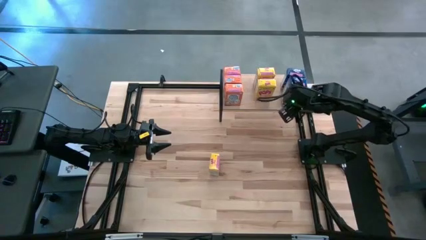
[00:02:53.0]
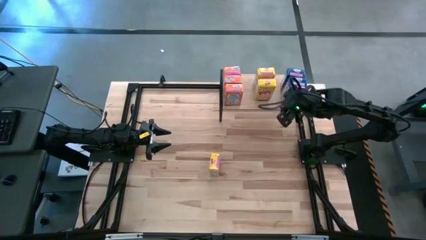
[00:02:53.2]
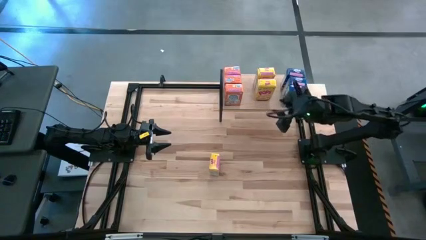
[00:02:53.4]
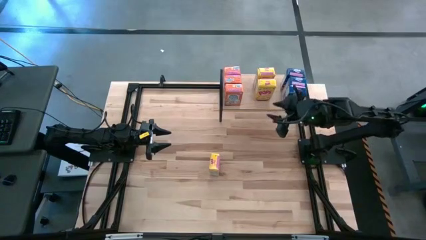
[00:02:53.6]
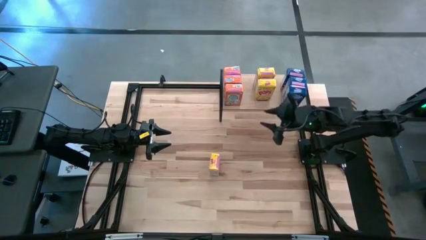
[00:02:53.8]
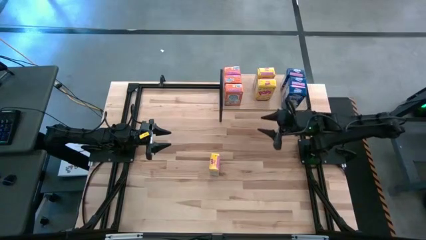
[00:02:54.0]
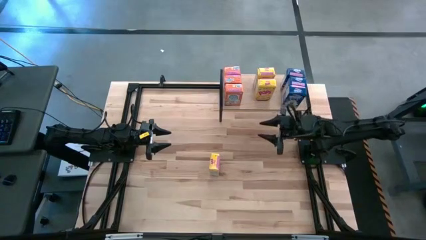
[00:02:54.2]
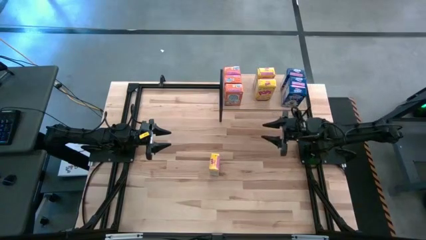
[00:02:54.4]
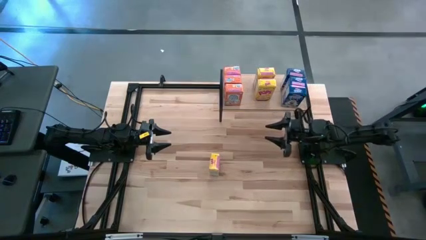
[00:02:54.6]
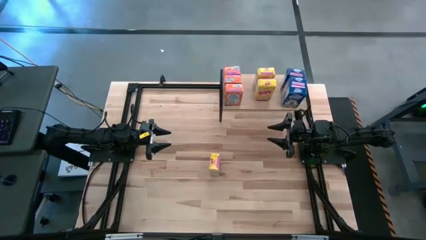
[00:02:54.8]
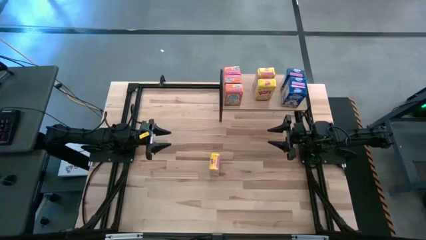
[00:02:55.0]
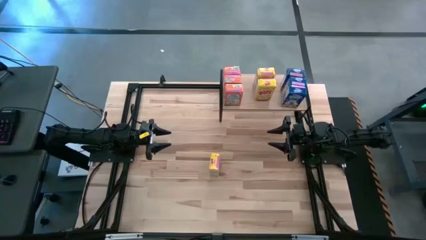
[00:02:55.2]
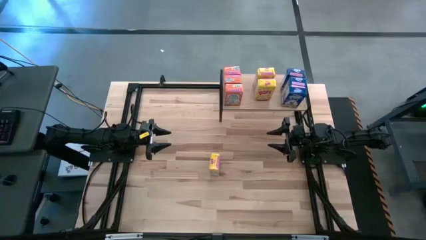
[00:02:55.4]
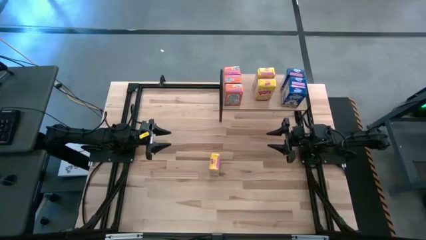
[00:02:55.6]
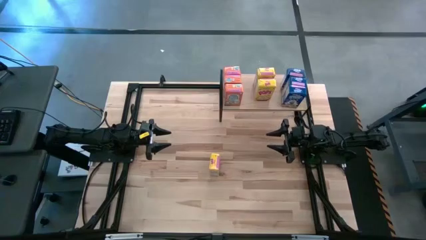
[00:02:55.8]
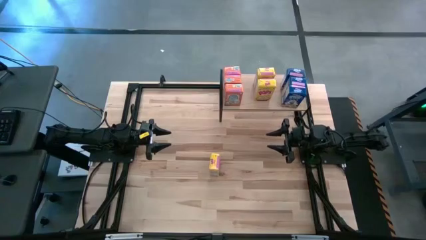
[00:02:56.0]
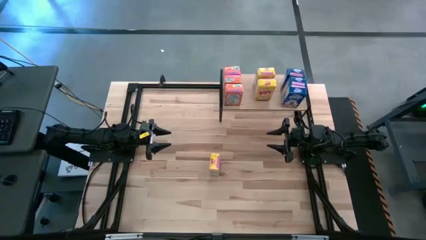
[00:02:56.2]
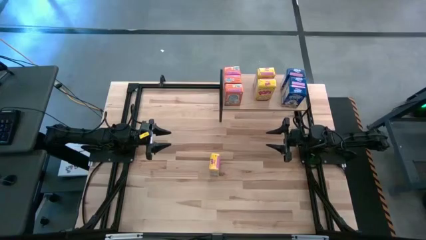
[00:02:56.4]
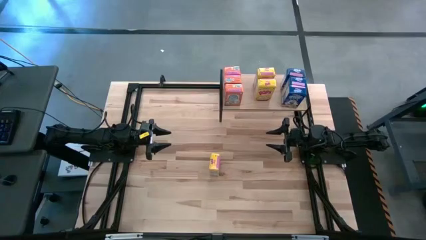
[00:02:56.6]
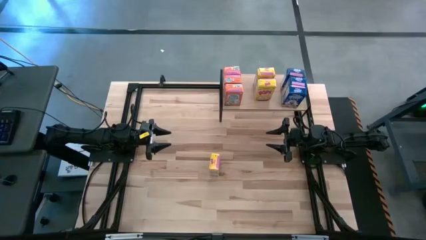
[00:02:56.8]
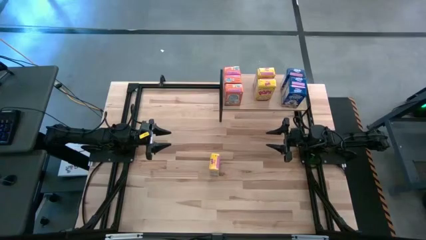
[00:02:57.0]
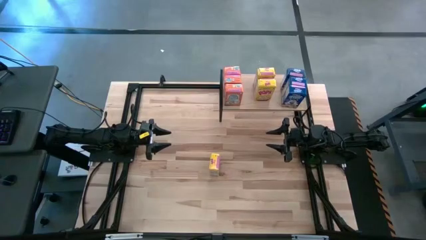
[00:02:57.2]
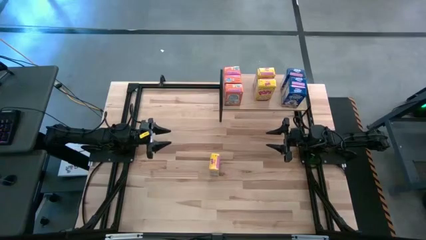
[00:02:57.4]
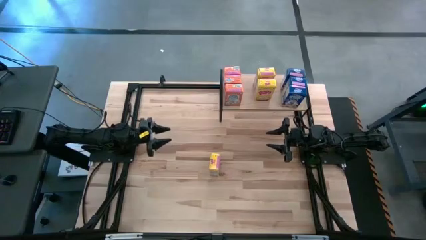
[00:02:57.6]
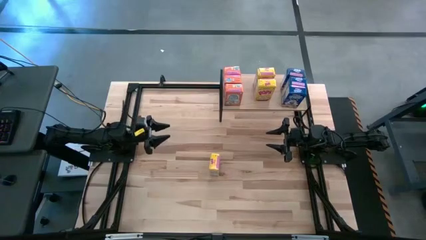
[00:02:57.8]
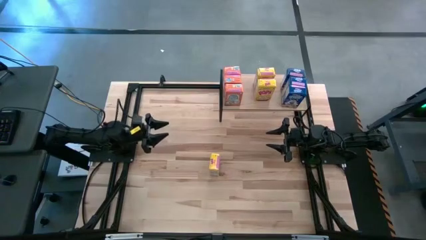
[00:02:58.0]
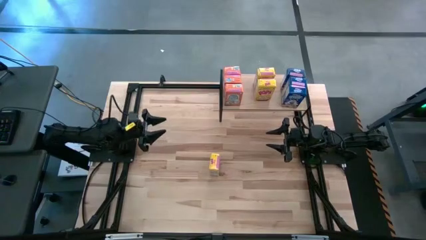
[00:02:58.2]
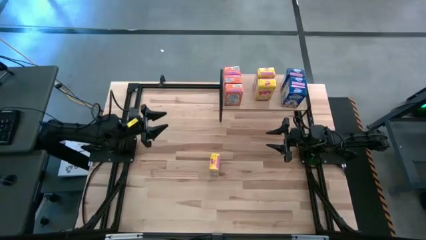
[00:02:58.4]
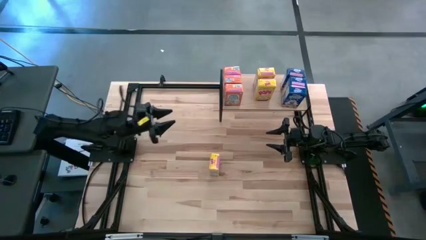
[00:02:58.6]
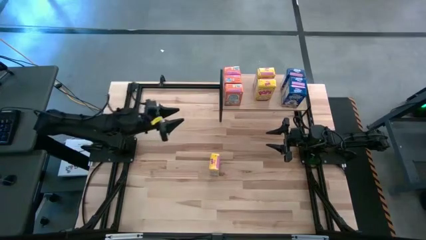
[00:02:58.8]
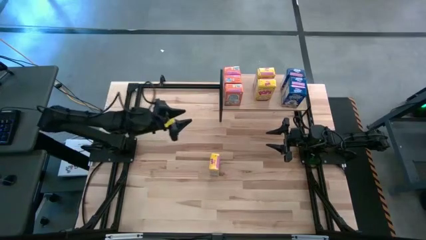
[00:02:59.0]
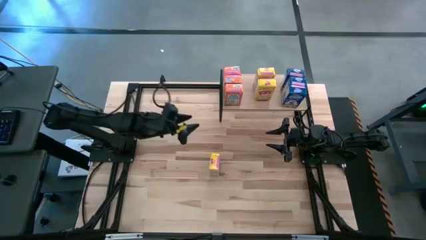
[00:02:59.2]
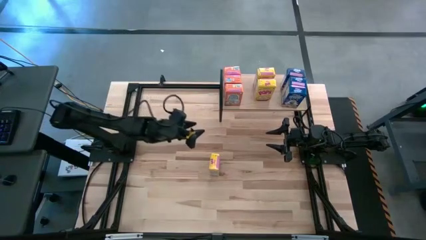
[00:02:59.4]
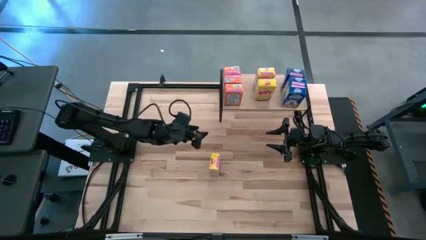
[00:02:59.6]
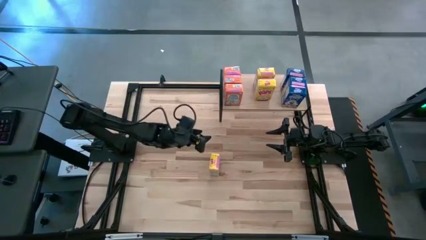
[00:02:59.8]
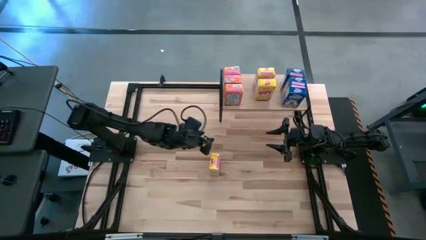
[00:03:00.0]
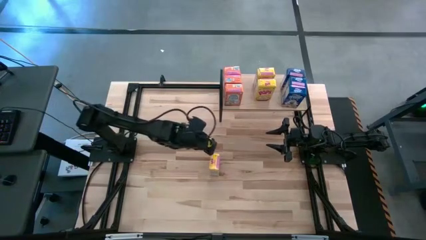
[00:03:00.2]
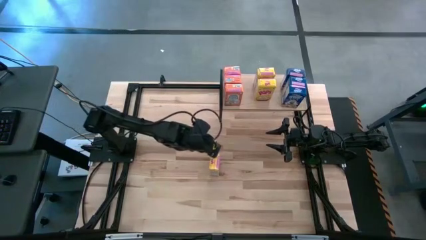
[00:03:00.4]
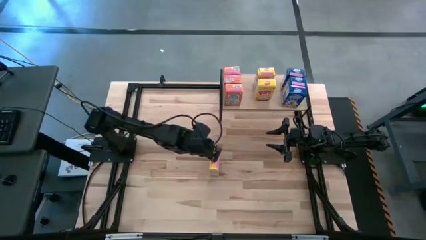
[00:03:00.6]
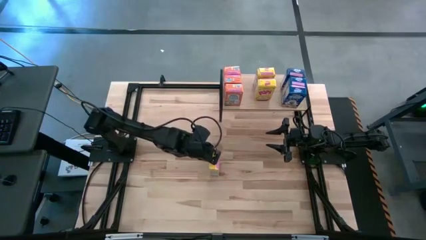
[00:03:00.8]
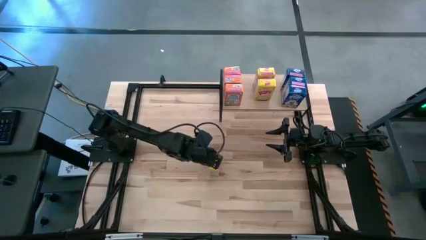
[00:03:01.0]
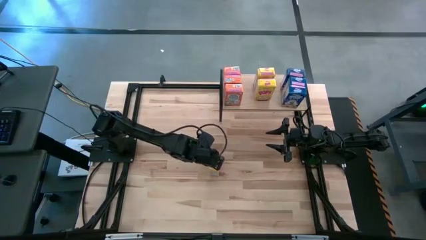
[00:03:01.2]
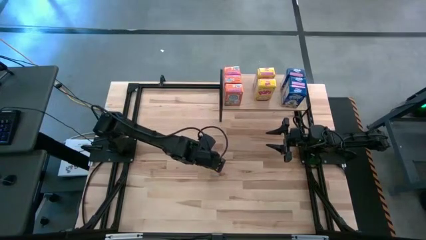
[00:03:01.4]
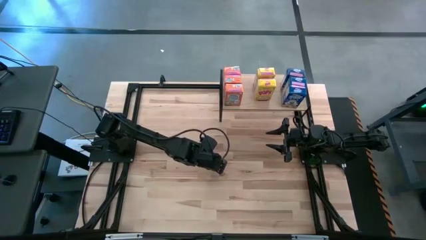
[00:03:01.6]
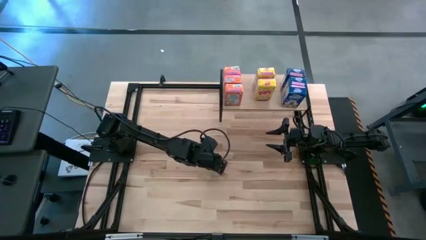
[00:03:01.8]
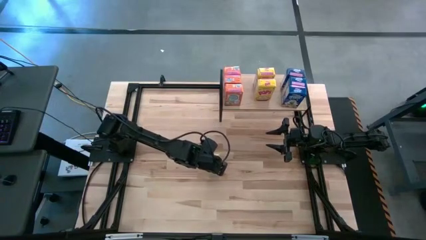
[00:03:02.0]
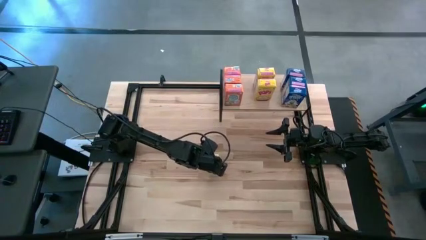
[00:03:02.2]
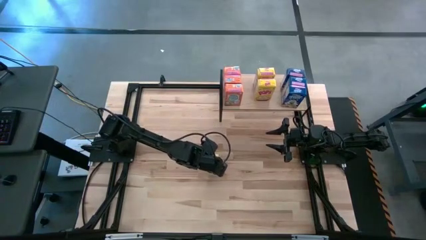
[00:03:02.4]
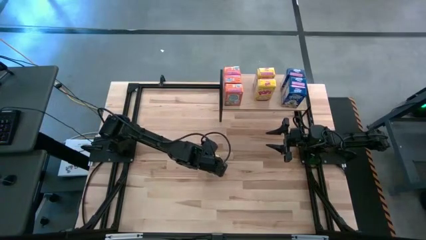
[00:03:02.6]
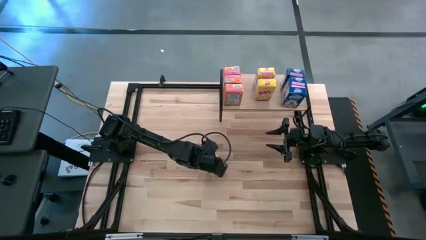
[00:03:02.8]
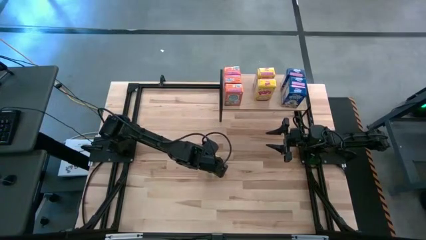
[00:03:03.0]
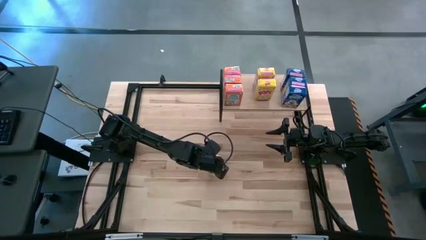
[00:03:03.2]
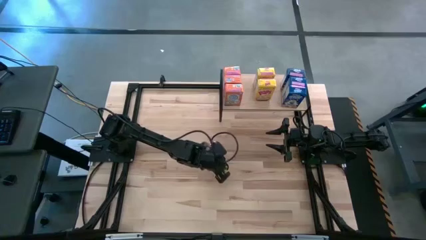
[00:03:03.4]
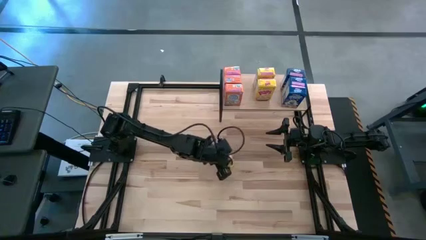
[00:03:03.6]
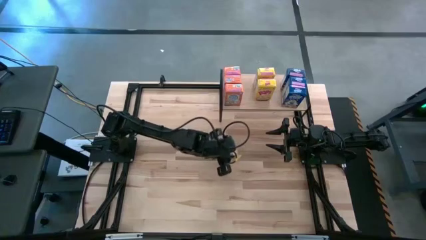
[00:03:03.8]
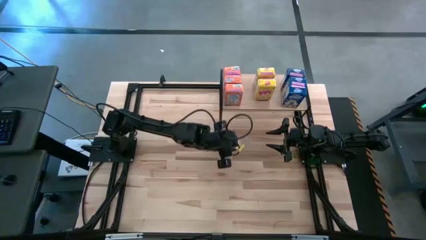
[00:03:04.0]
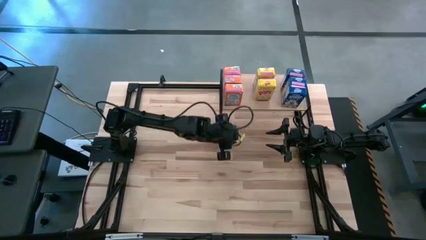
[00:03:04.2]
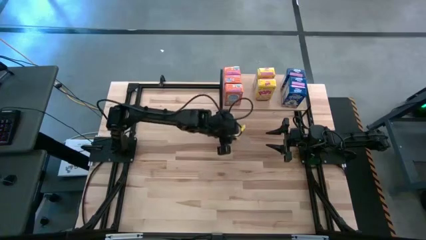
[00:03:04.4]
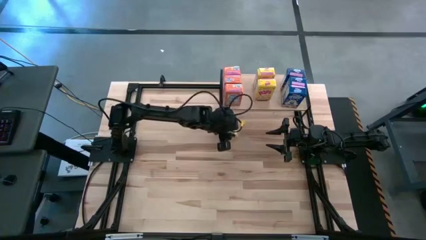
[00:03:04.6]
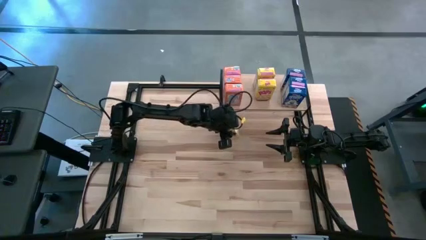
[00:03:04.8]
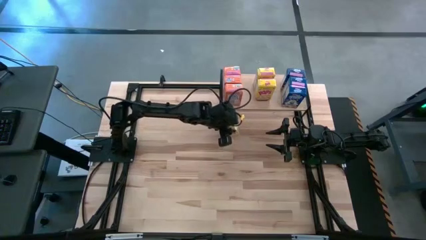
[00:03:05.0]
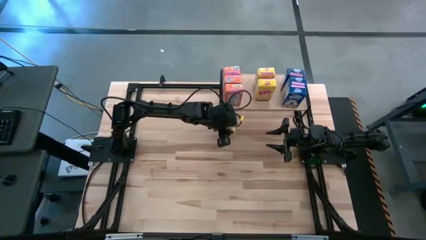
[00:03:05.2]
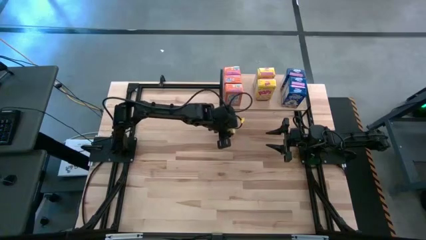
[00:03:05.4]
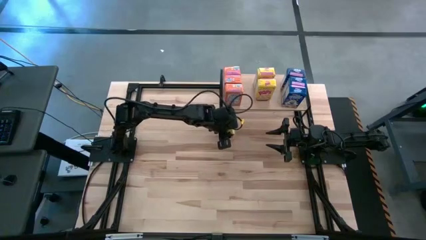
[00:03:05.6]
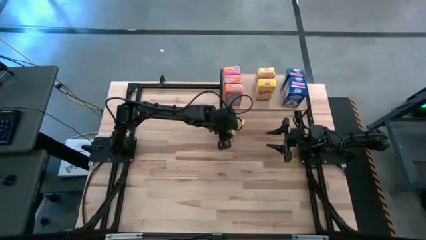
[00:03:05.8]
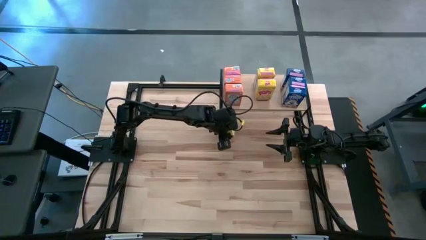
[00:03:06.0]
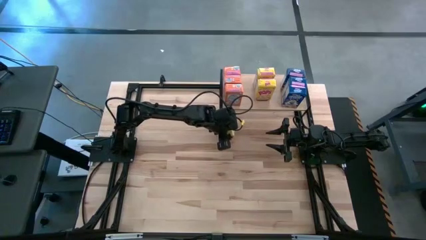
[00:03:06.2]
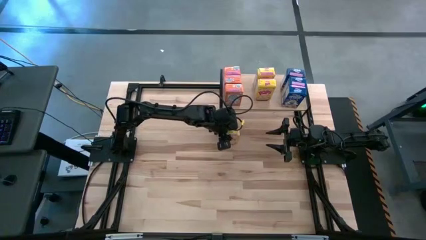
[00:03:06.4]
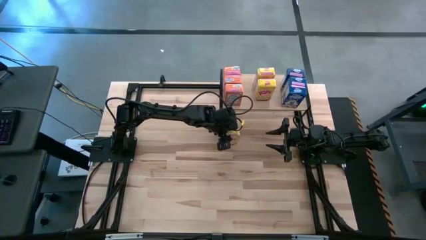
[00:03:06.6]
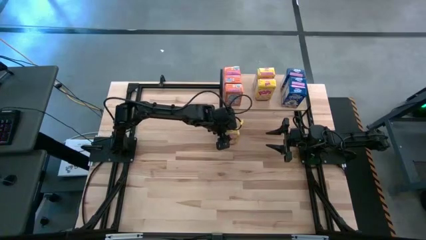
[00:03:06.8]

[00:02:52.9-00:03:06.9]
Task: Stack cereal on shelf
Put the yellow cereal box on the shelf aligned with the yellow cereal boxes

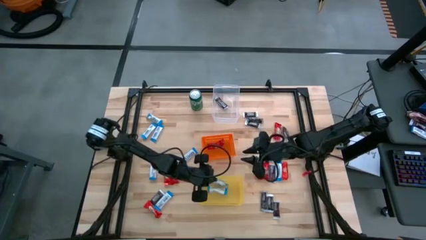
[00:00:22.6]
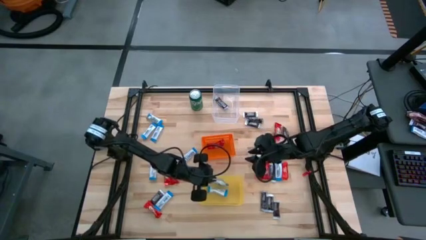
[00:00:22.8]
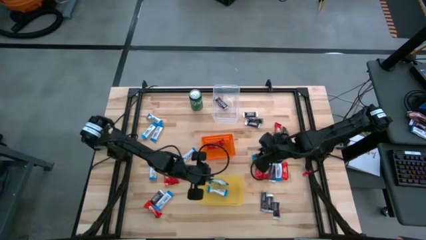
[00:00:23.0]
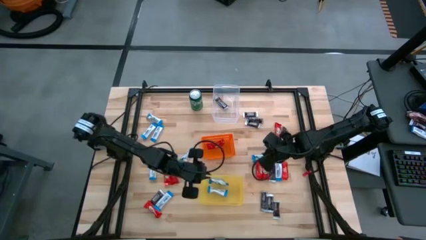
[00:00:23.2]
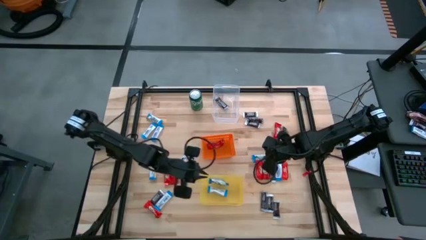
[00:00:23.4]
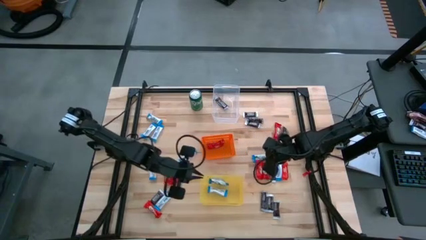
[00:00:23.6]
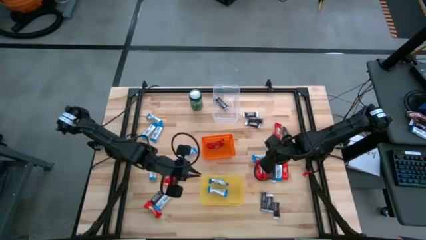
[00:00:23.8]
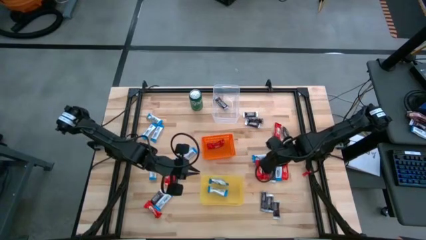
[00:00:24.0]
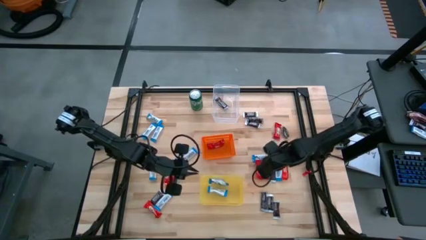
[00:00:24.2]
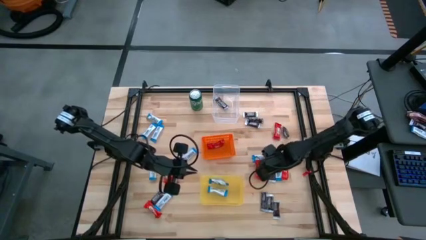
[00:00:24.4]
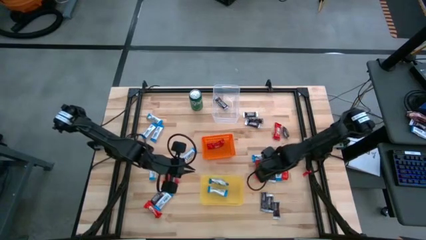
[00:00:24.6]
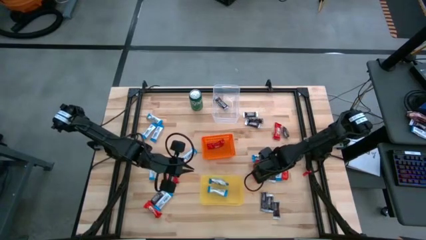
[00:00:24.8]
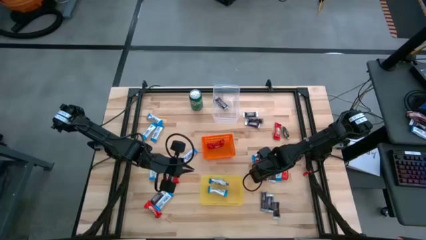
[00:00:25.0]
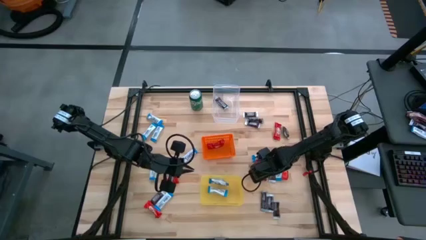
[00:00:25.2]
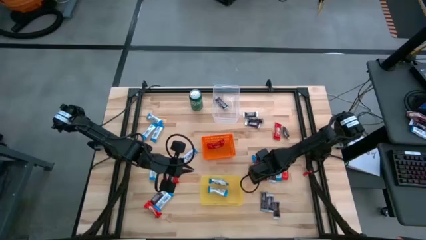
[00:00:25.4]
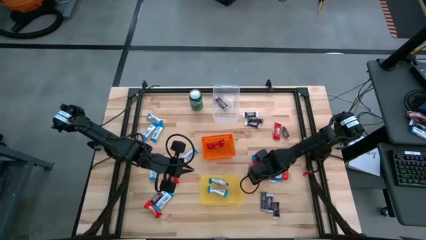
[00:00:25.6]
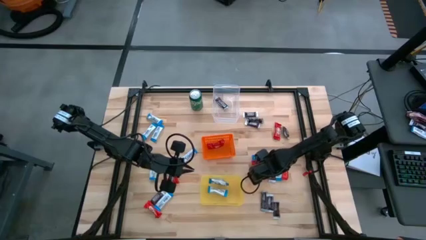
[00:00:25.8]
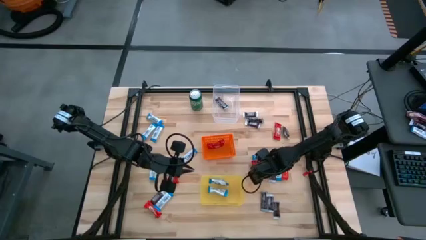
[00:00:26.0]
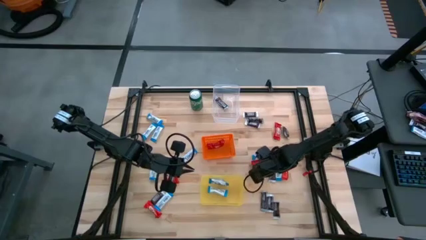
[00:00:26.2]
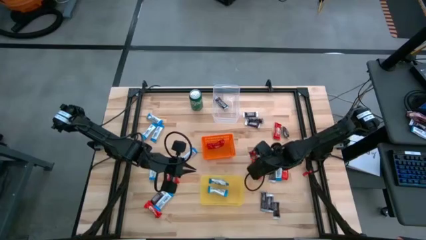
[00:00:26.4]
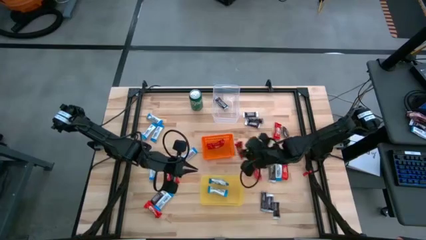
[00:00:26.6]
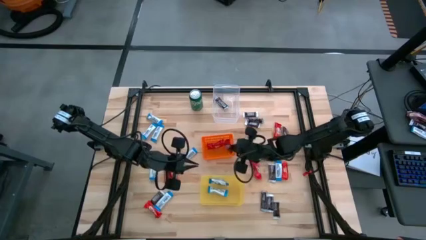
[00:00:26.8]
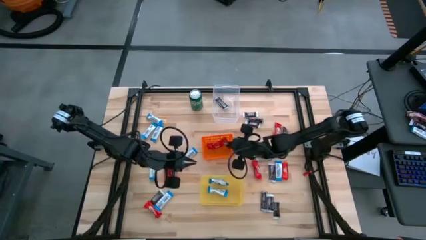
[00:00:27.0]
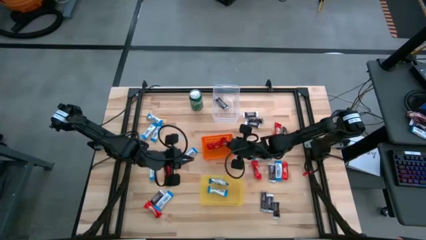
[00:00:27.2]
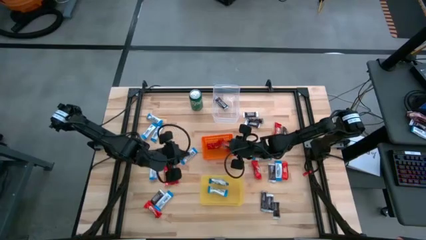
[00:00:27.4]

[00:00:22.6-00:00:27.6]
Task: Sort candy
Put the red candy into the orange bin
